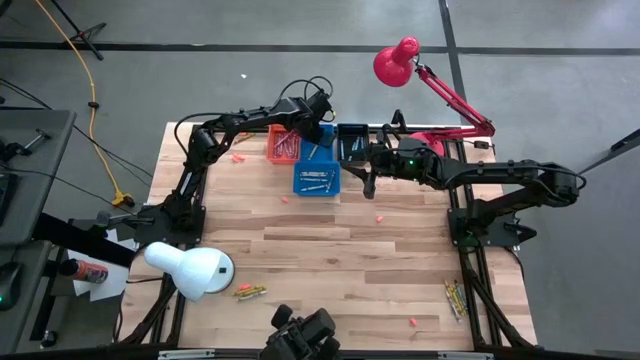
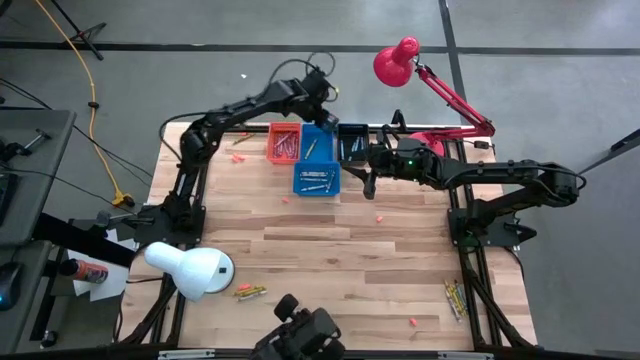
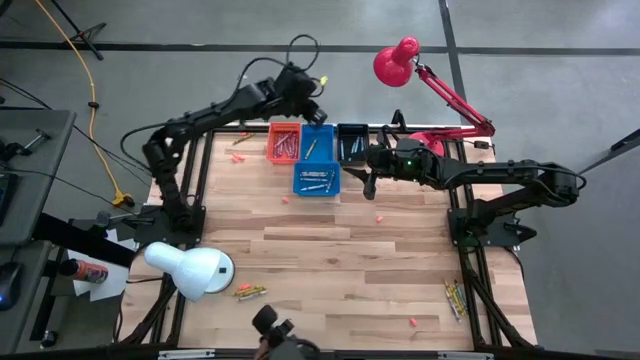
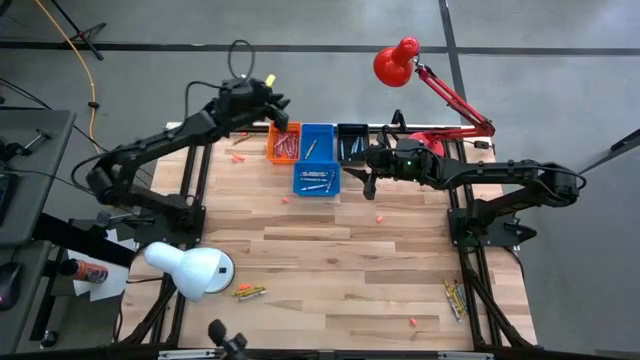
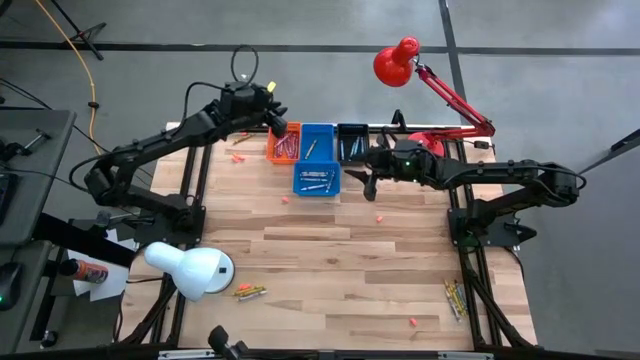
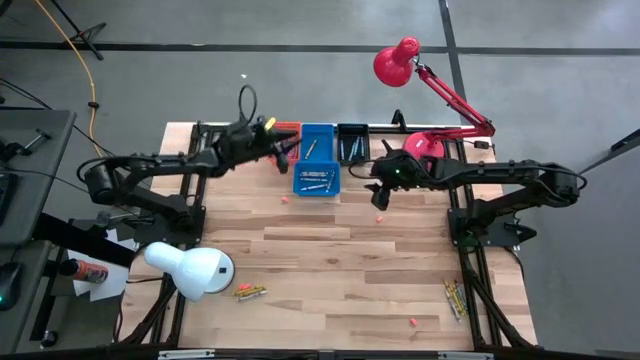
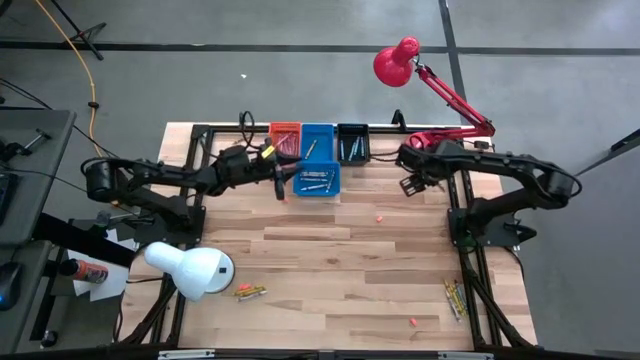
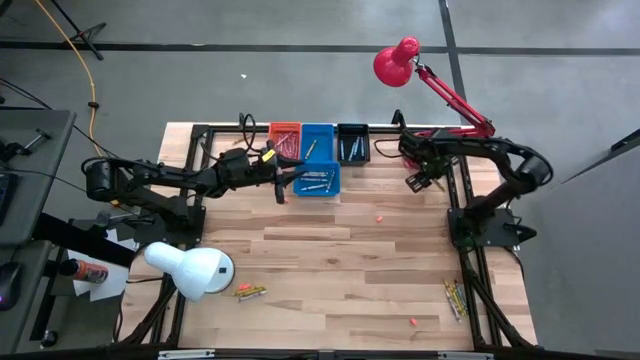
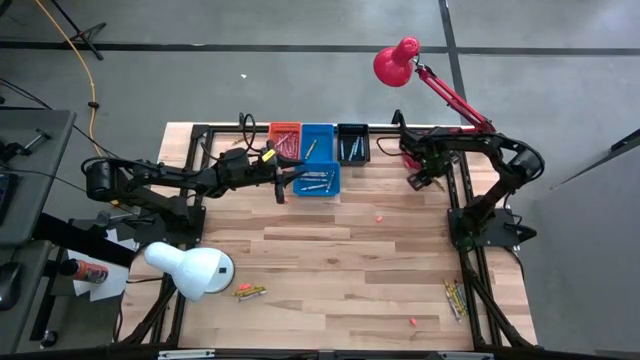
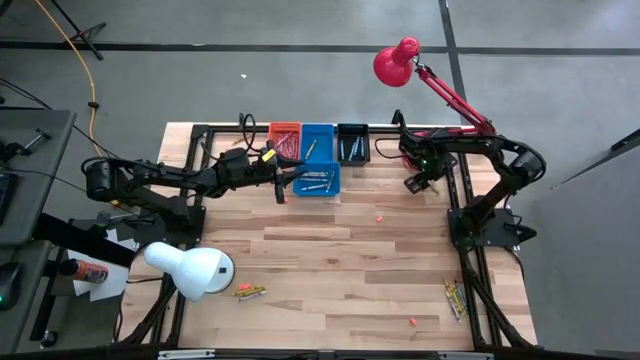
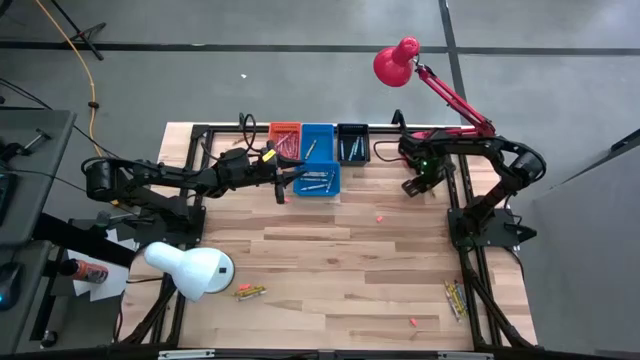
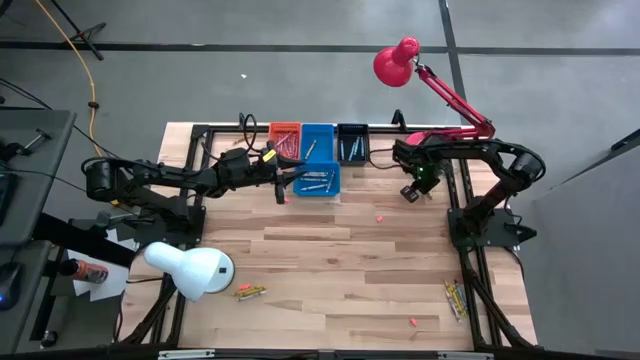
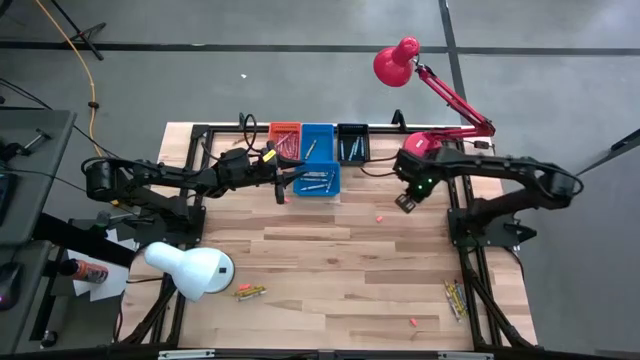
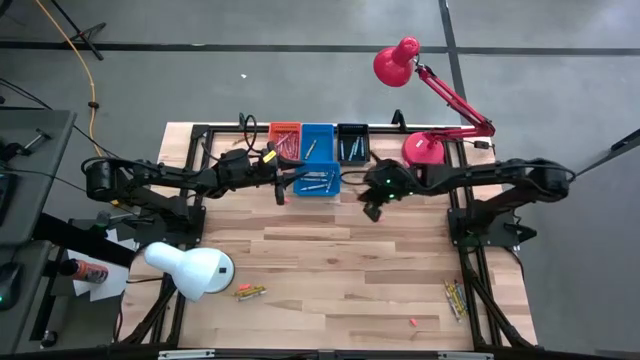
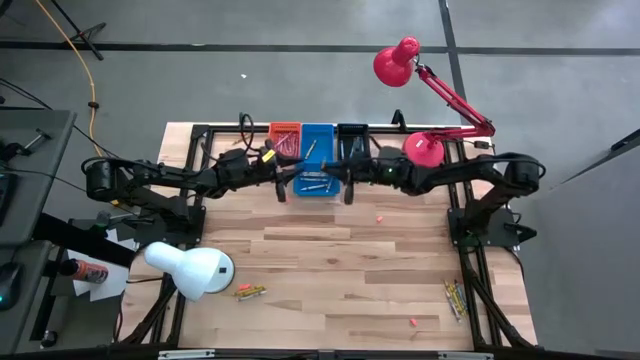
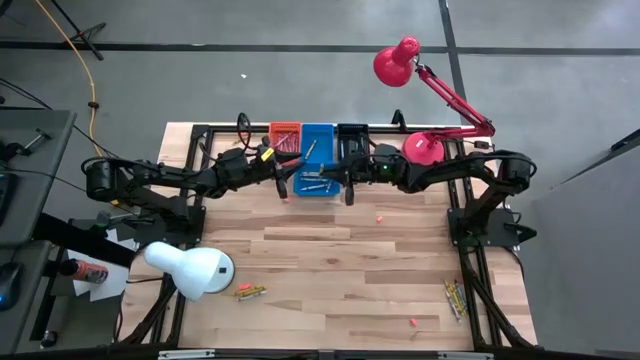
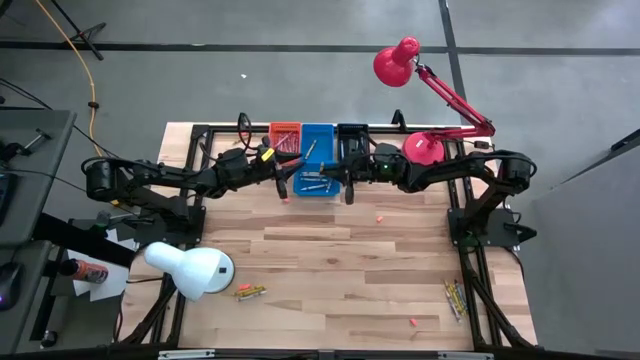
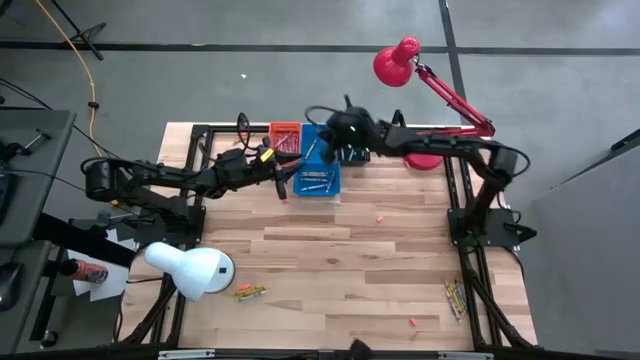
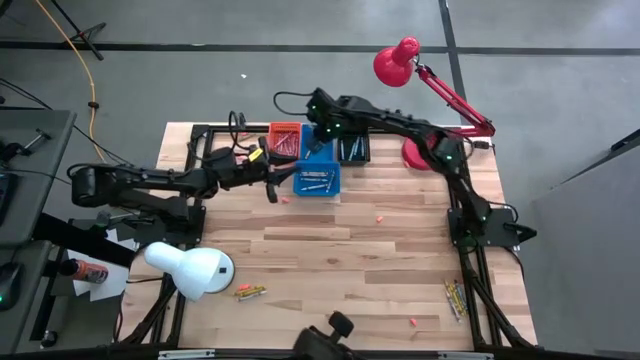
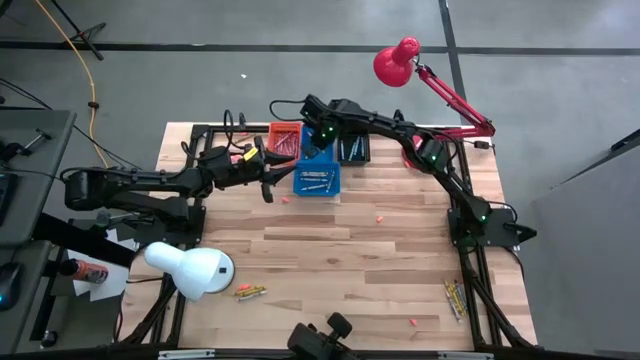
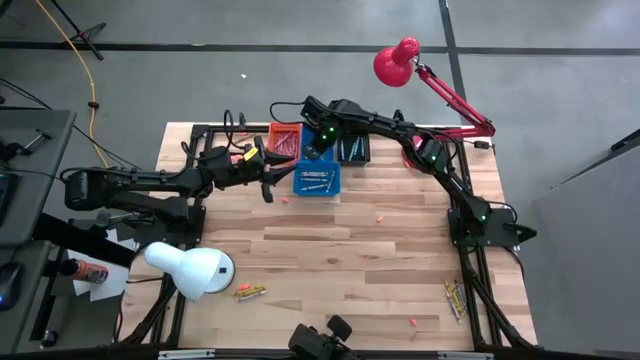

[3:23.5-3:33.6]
Task: Sort crayons
Put the yellow crayon into the top blue bin

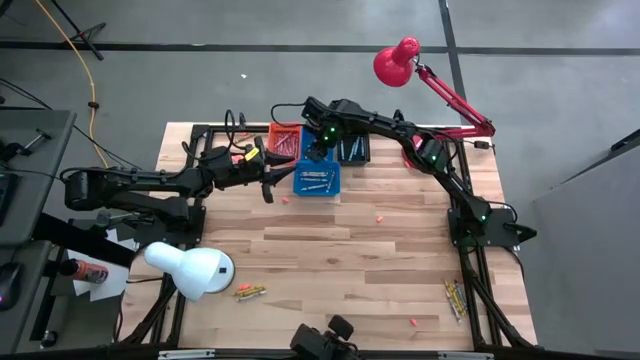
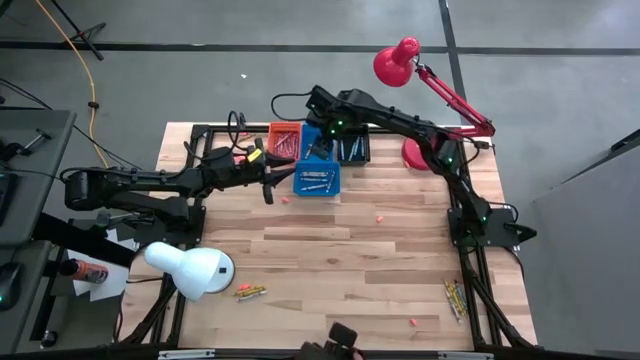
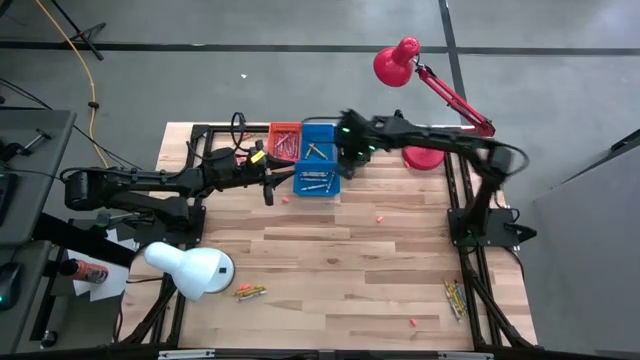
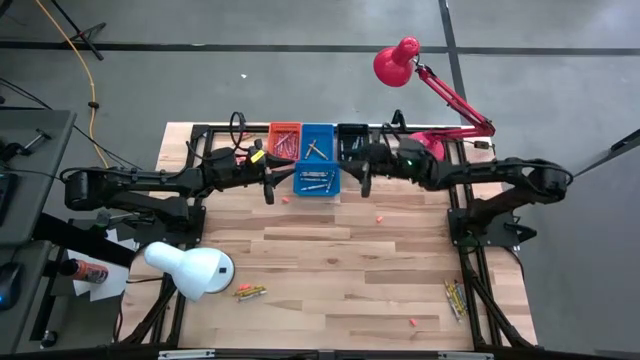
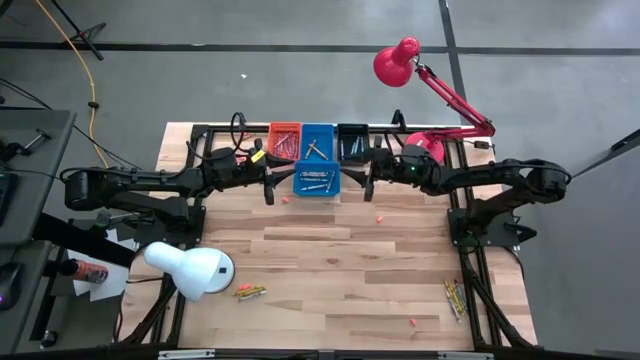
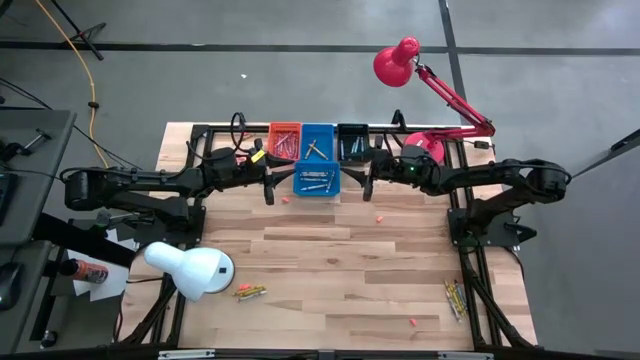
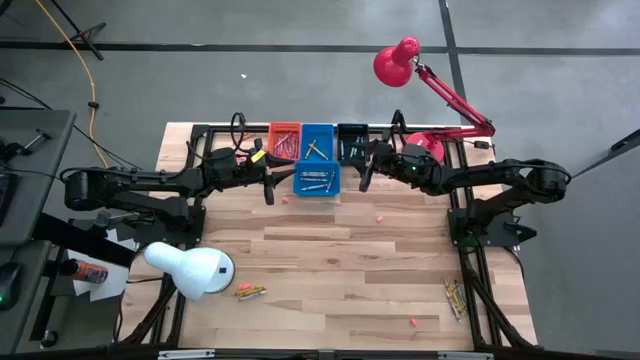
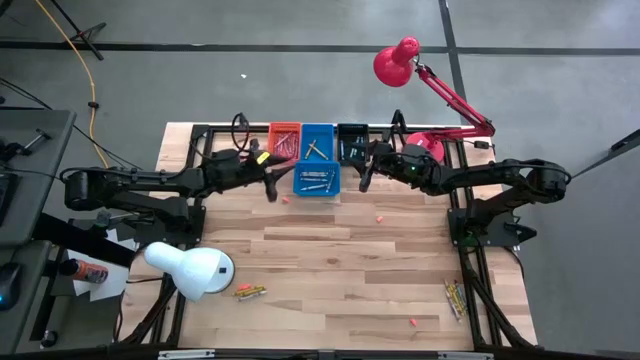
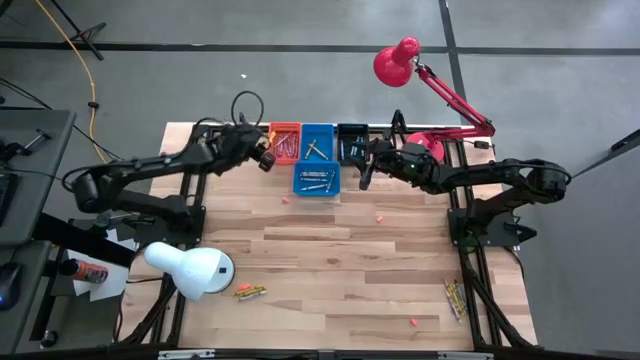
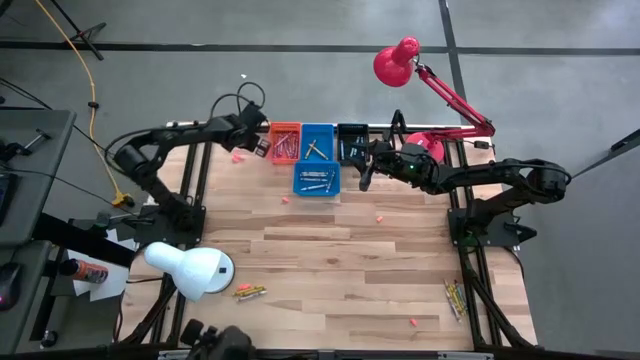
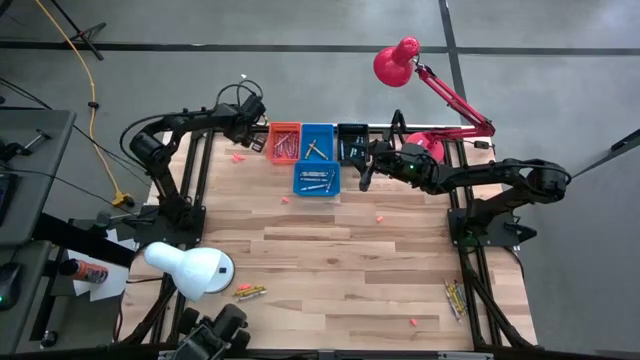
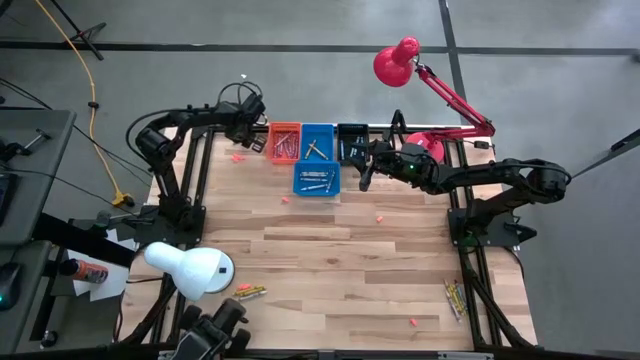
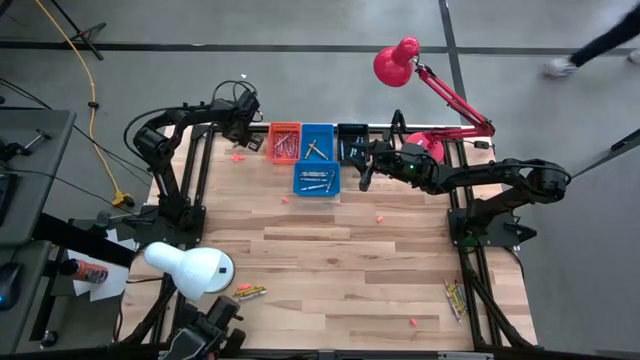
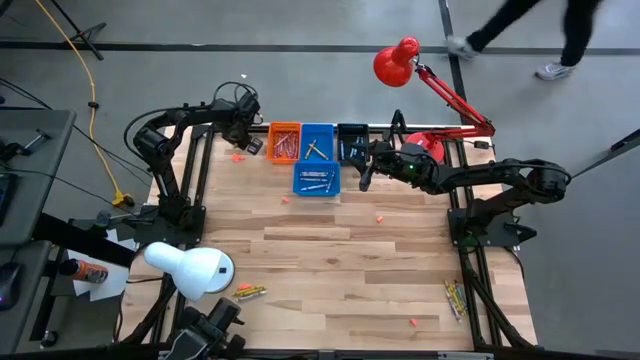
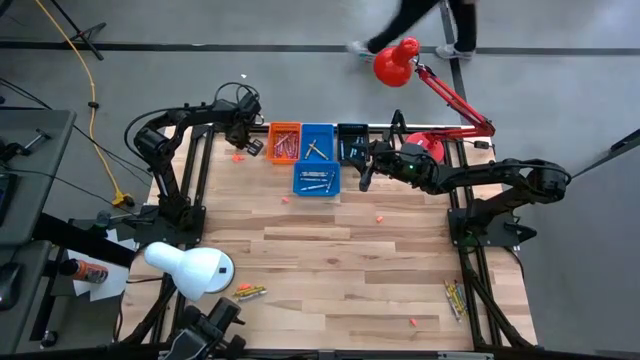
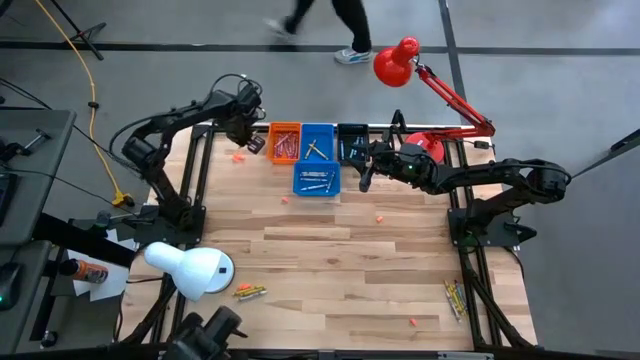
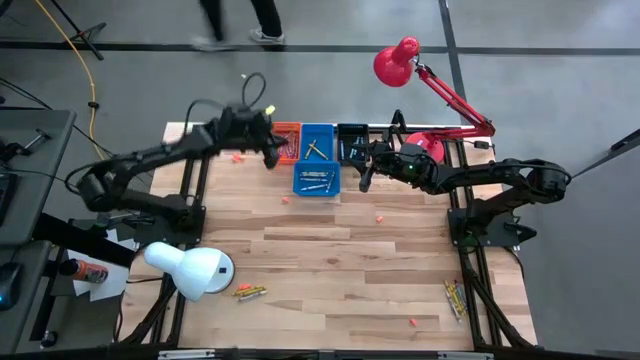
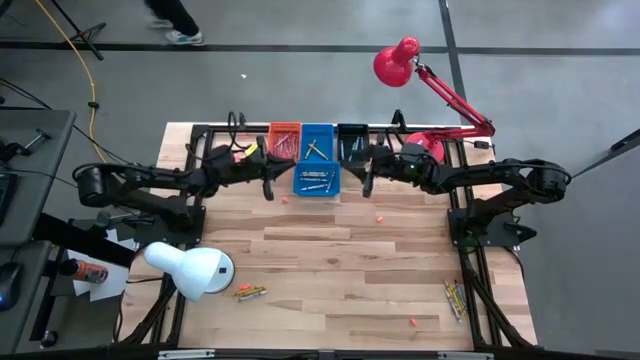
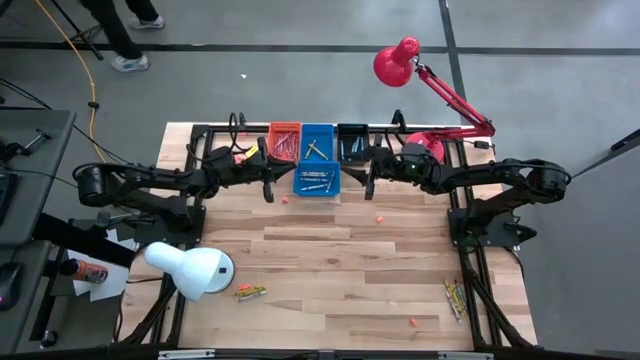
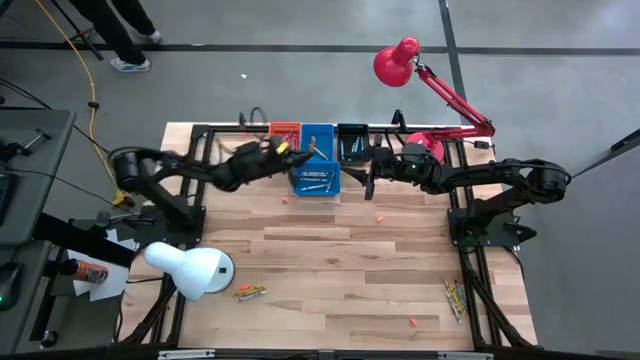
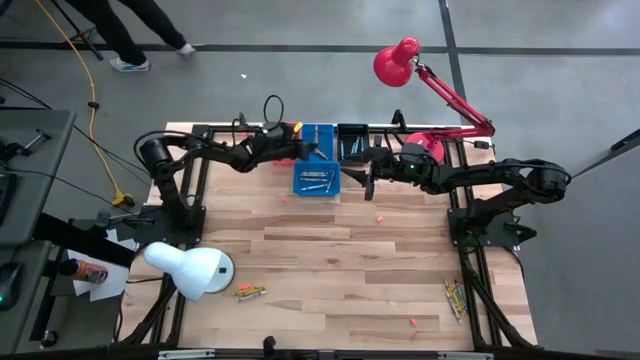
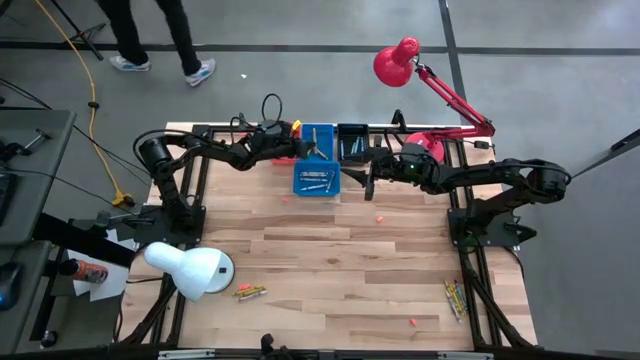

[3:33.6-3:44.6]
Put the yellow crayon into the top blue bin
